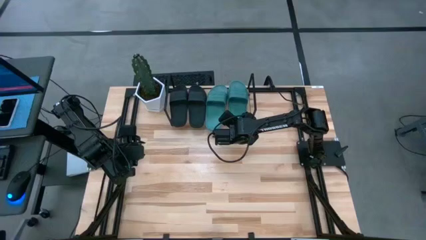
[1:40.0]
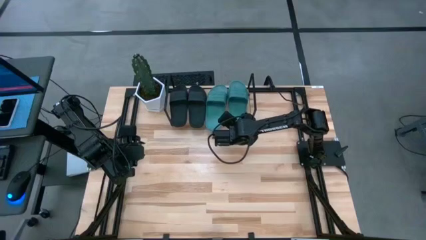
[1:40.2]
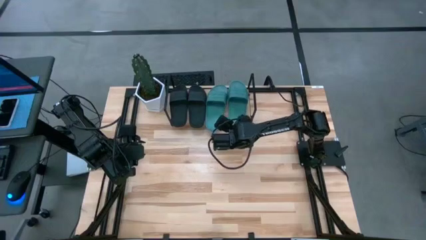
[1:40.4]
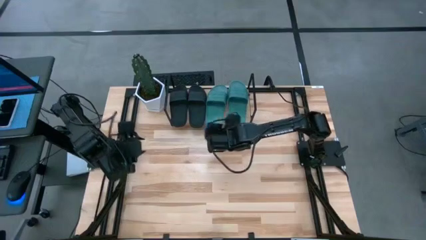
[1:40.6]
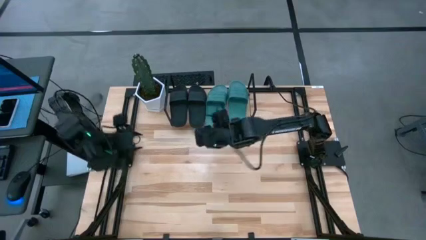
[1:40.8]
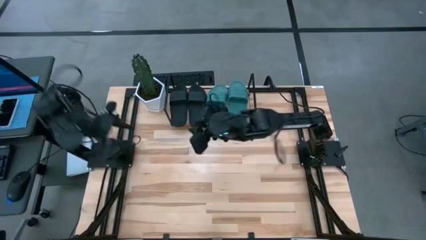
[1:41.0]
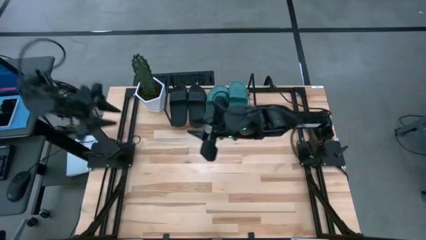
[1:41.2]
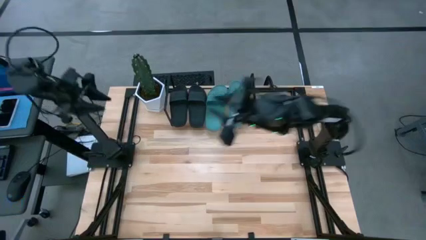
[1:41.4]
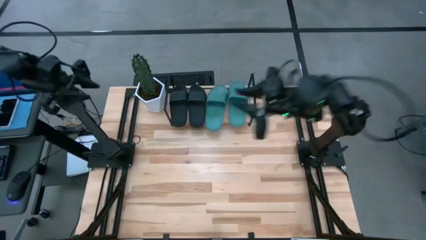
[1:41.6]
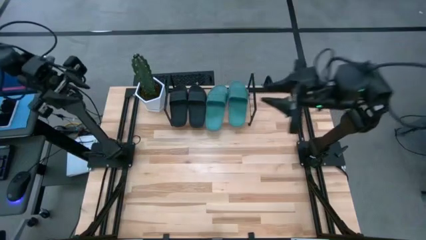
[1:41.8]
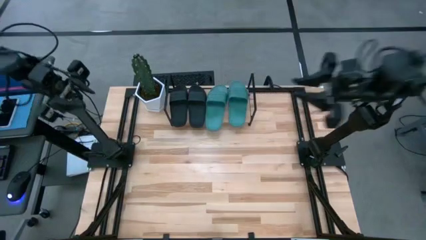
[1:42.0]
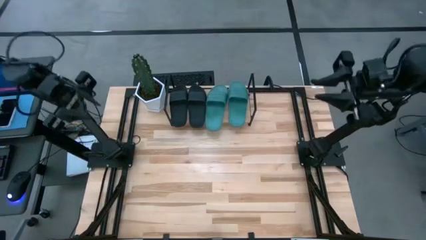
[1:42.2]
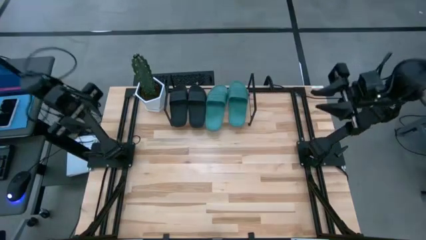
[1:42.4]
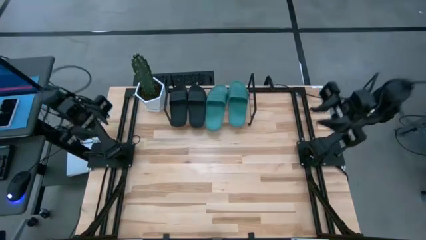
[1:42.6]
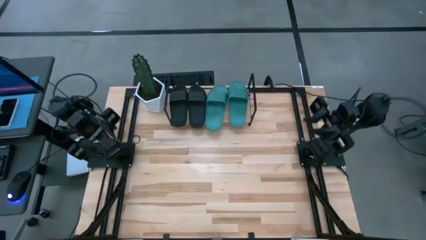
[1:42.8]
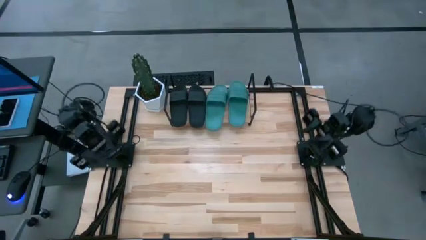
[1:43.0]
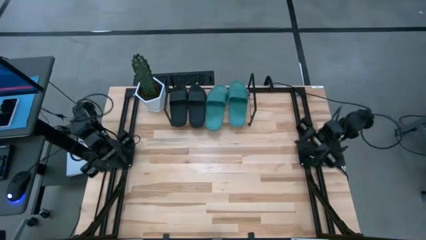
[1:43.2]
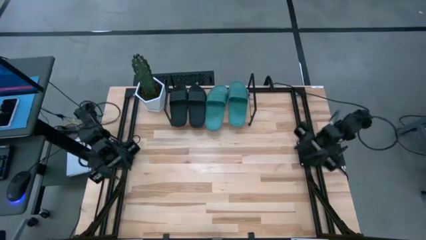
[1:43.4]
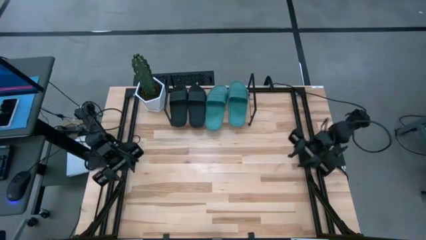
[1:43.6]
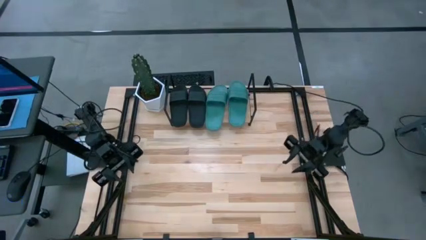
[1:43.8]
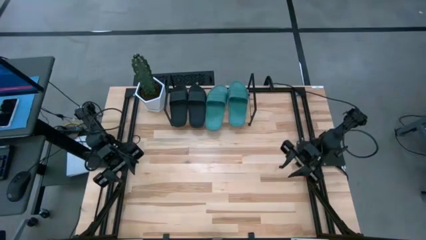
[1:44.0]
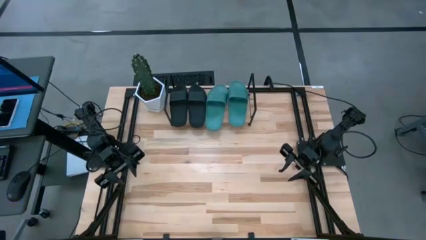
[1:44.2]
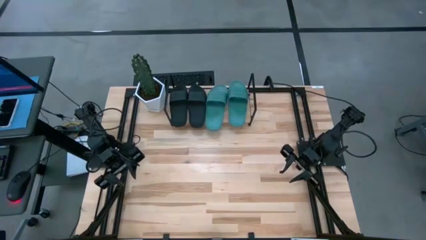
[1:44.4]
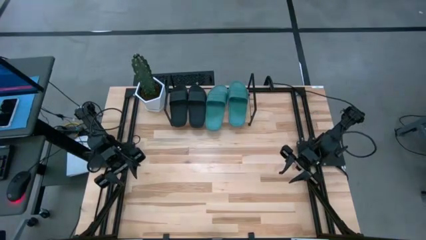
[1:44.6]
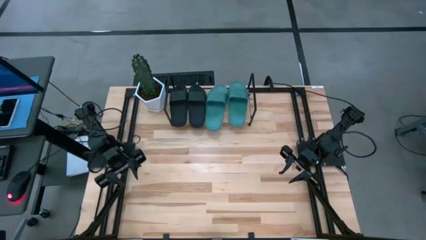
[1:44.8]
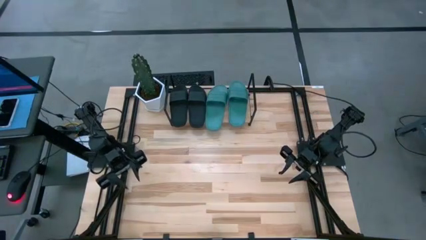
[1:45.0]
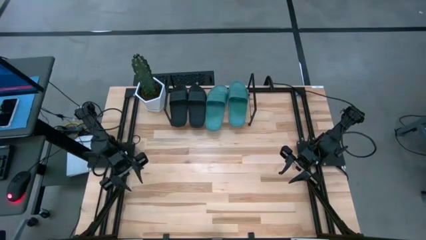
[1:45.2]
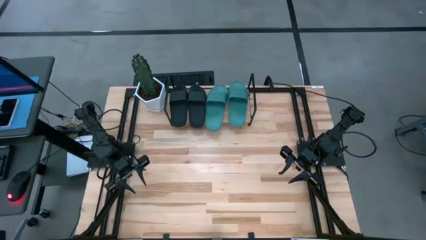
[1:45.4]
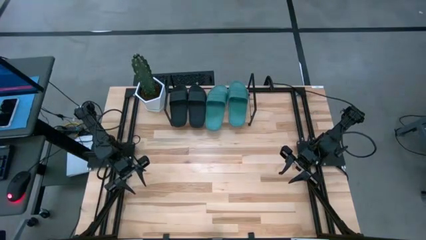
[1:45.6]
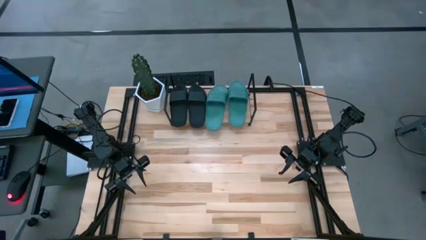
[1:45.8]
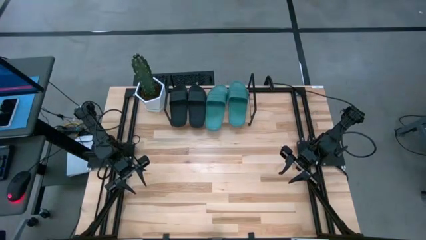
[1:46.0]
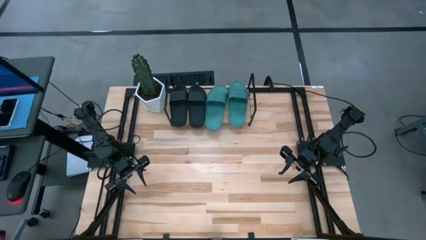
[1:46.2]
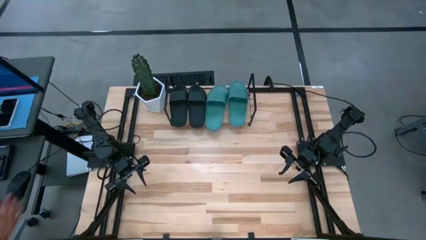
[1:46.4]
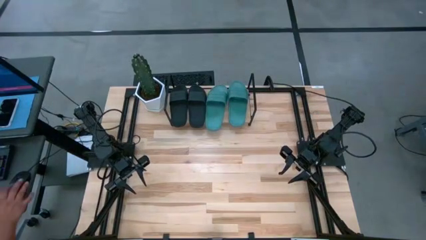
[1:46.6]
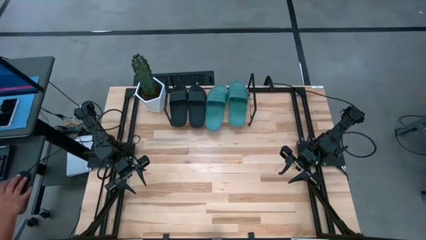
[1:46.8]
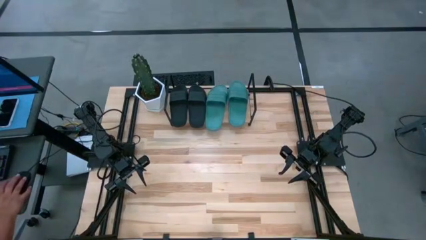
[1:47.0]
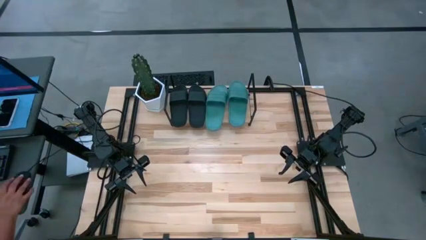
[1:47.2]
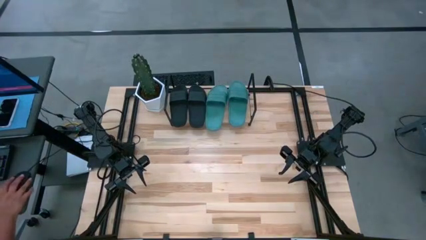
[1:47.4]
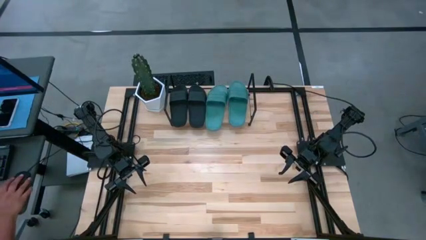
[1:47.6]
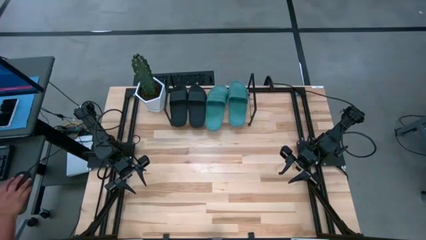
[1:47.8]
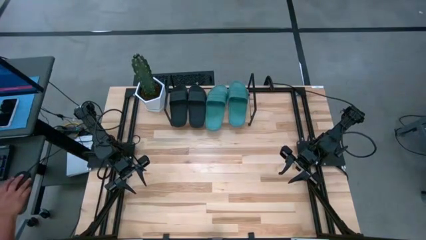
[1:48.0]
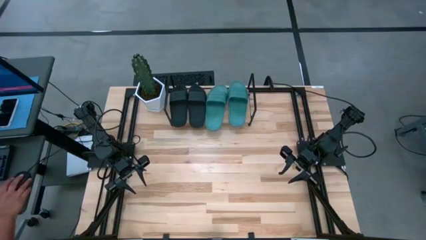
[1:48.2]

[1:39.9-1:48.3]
Task: Pick and place slides into the shelf
Return to Home Position

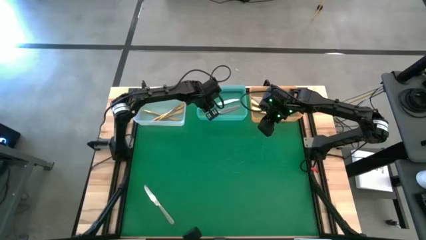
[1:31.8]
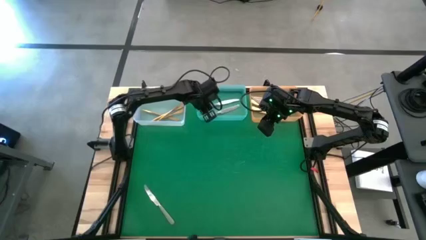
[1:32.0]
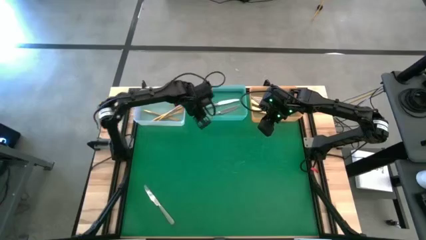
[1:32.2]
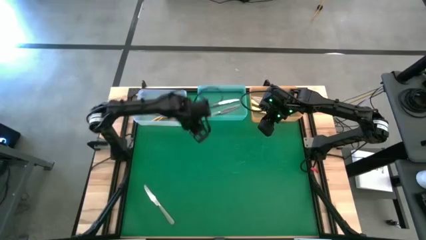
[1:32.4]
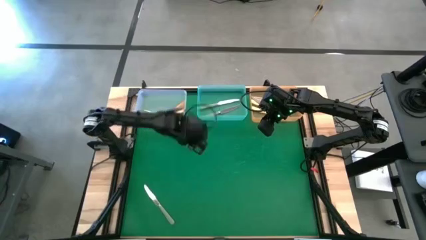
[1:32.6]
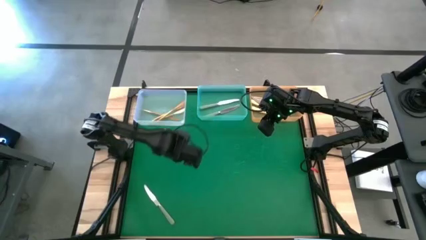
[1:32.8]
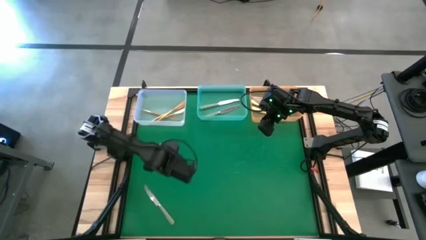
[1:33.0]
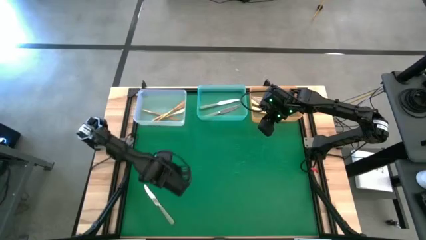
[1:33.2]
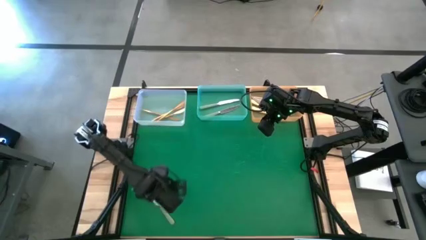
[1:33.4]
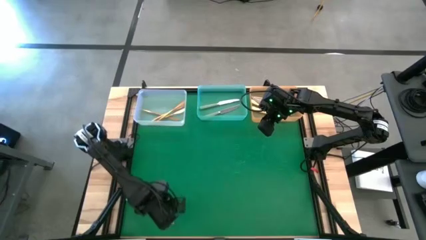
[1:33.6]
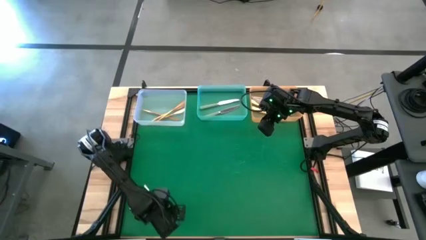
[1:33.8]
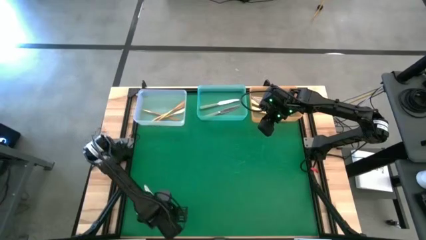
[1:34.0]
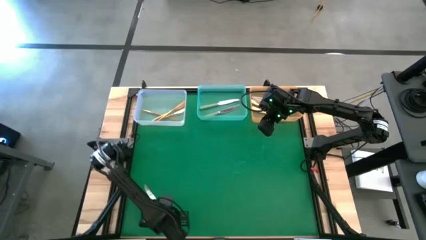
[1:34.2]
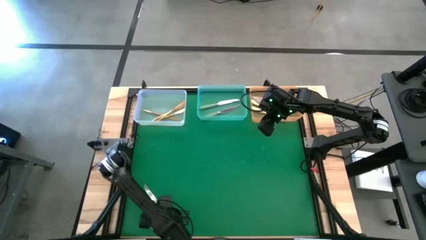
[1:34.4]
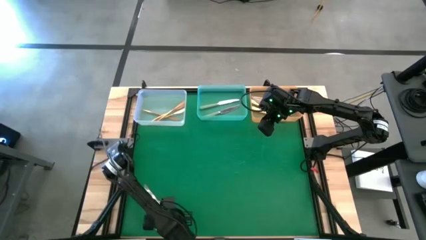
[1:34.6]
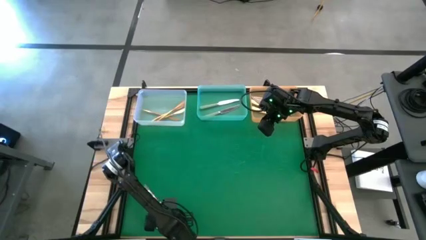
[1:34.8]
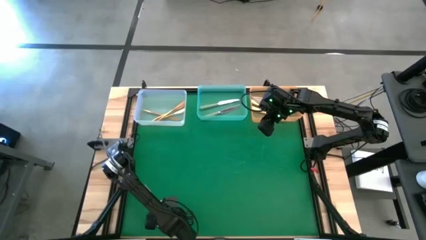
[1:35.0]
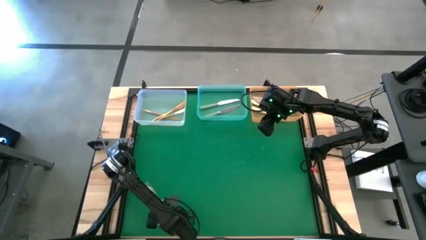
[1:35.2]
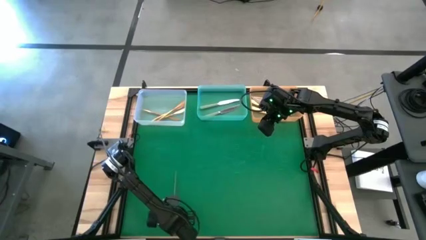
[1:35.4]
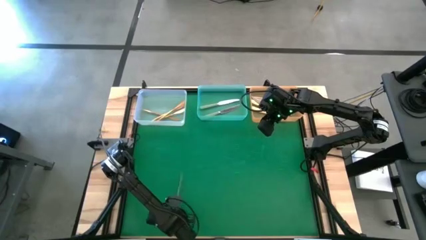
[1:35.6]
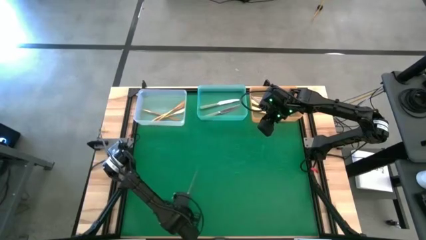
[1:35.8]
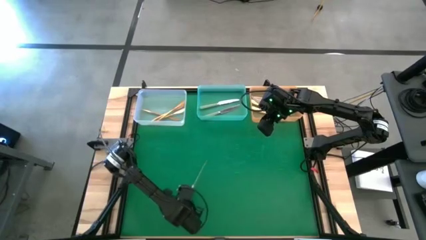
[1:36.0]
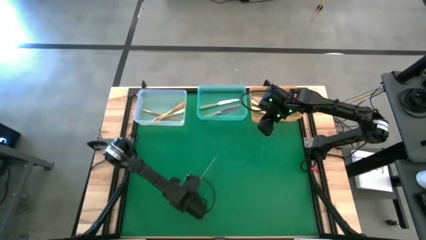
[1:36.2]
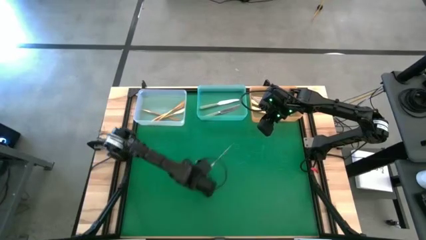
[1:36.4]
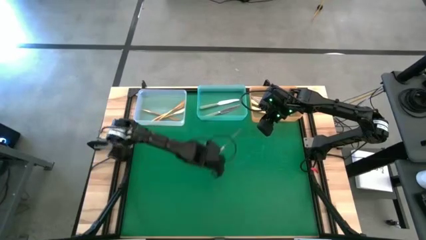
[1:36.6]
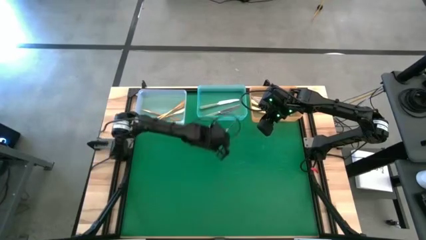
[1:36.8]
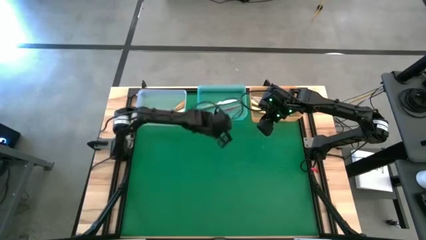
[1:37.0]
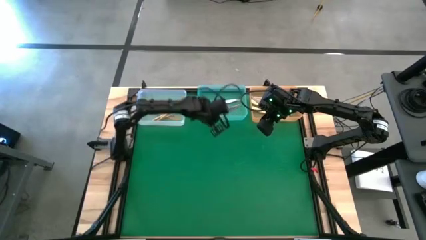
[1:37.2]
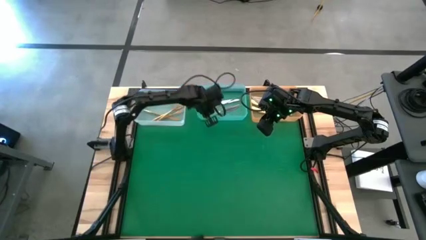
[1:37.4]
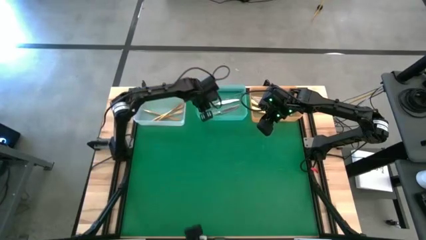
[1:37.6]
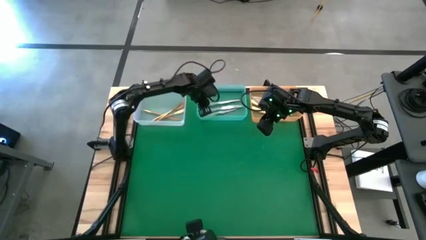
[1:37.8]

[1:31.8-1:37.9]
Task: Sort silverware by color (type)
Put the green table knife into the blue transparent bin
